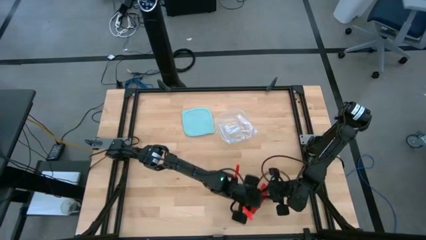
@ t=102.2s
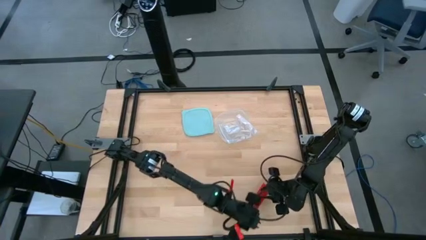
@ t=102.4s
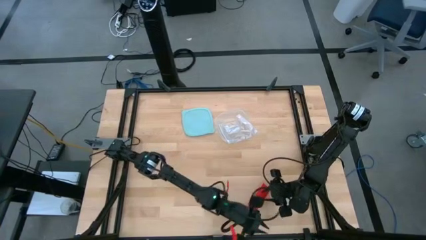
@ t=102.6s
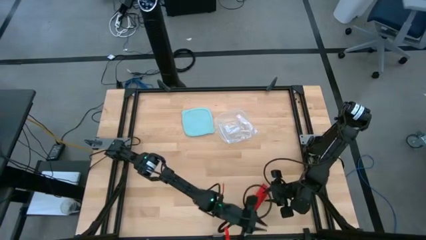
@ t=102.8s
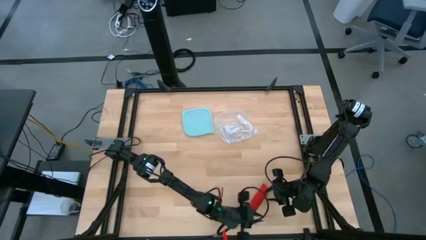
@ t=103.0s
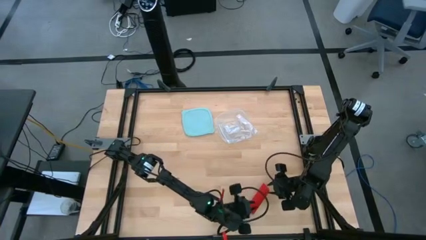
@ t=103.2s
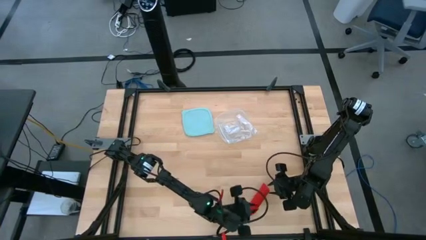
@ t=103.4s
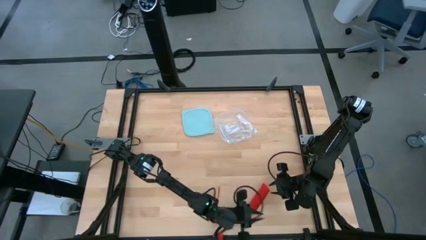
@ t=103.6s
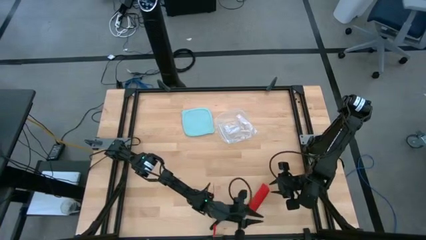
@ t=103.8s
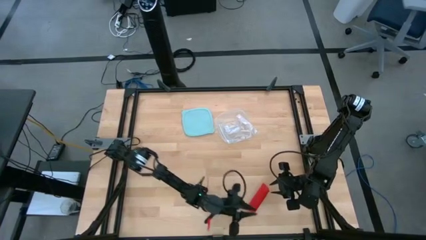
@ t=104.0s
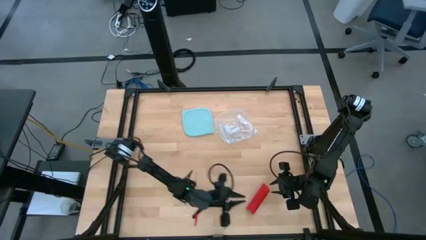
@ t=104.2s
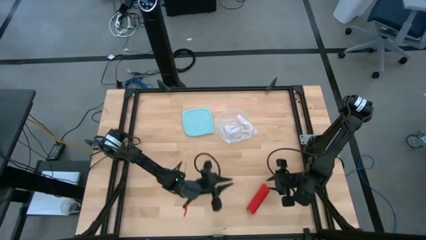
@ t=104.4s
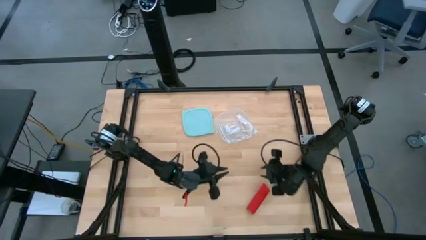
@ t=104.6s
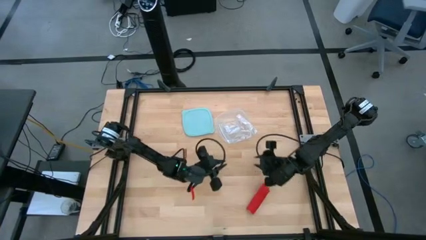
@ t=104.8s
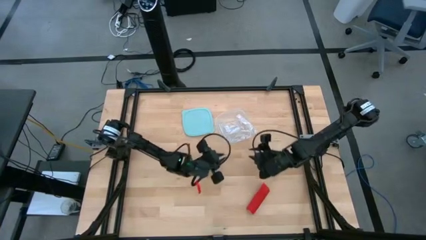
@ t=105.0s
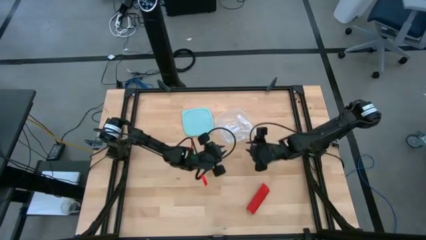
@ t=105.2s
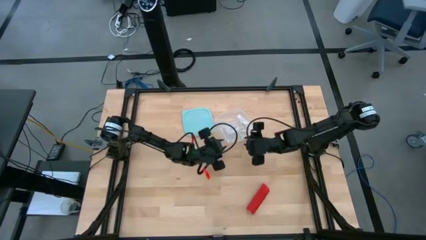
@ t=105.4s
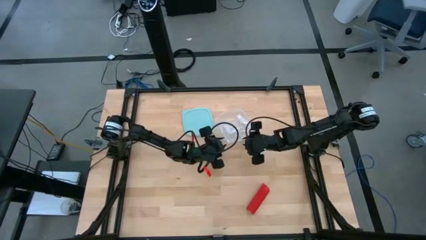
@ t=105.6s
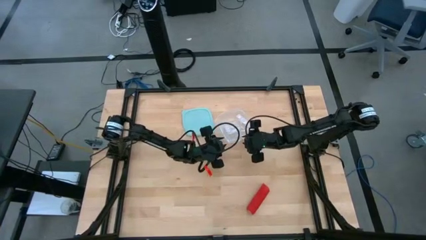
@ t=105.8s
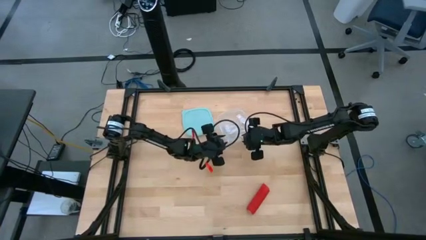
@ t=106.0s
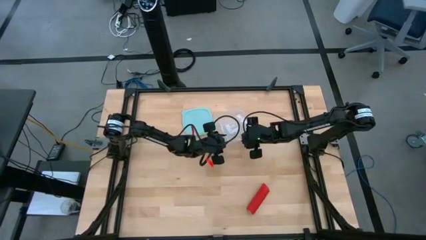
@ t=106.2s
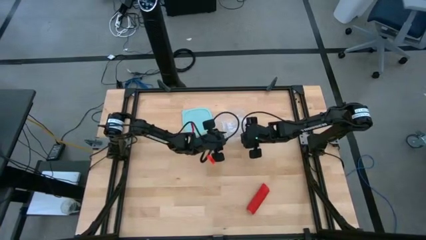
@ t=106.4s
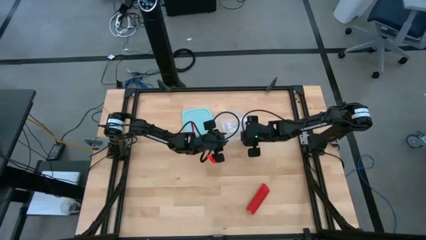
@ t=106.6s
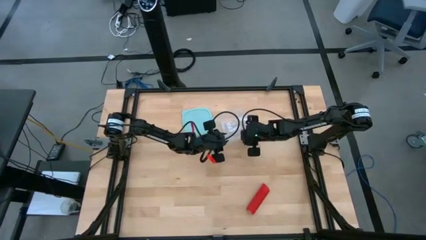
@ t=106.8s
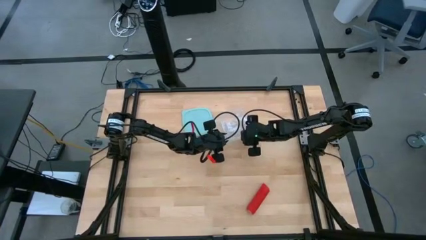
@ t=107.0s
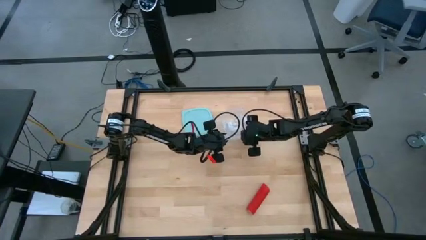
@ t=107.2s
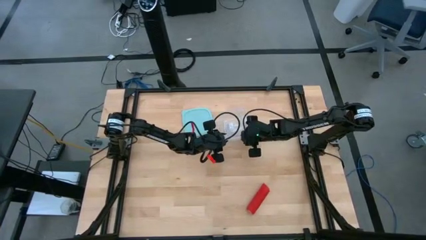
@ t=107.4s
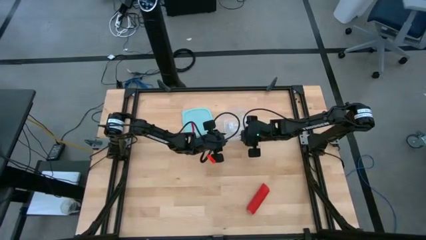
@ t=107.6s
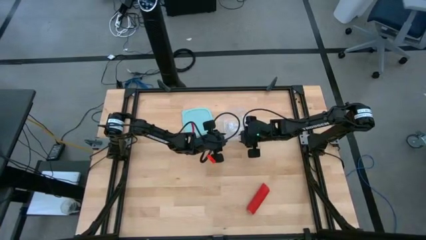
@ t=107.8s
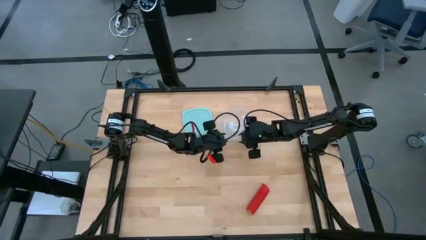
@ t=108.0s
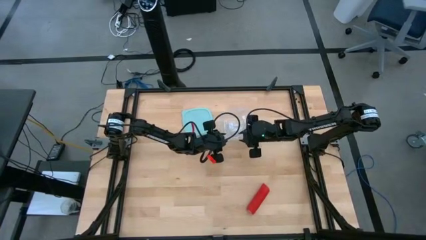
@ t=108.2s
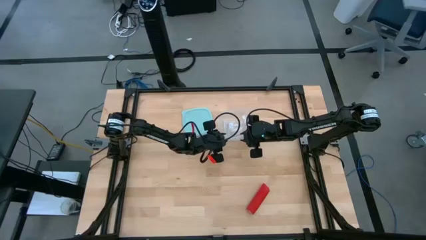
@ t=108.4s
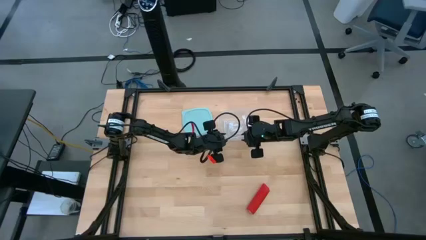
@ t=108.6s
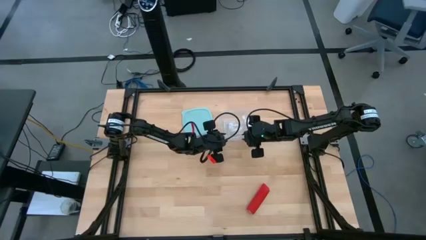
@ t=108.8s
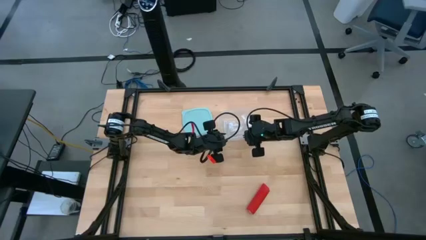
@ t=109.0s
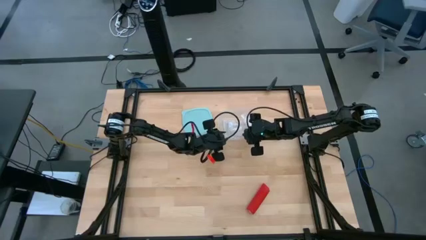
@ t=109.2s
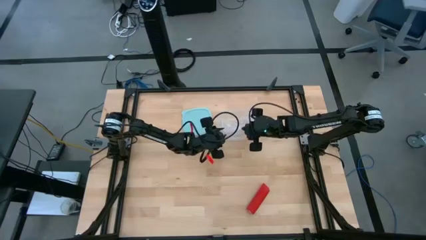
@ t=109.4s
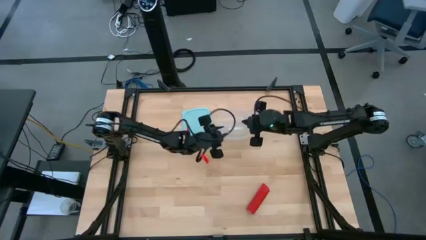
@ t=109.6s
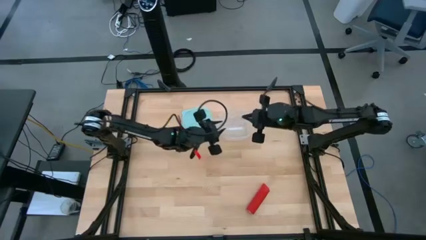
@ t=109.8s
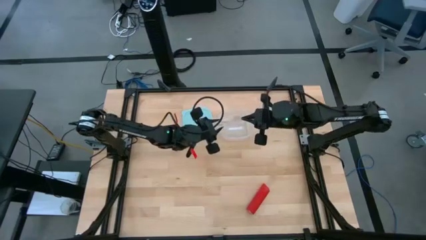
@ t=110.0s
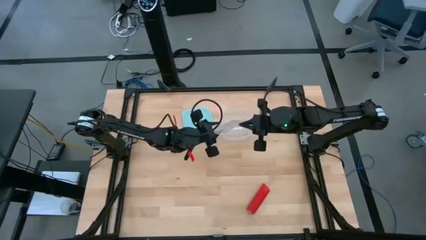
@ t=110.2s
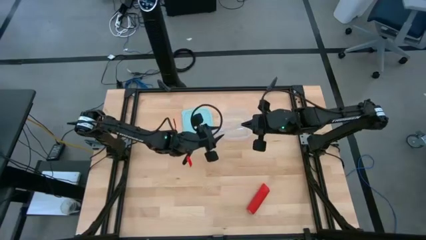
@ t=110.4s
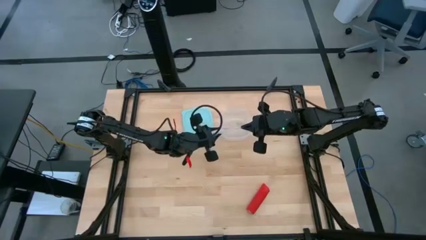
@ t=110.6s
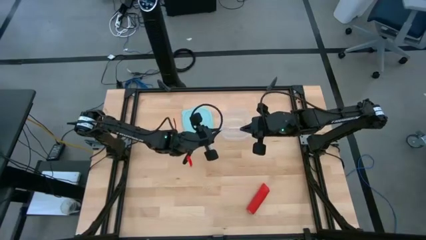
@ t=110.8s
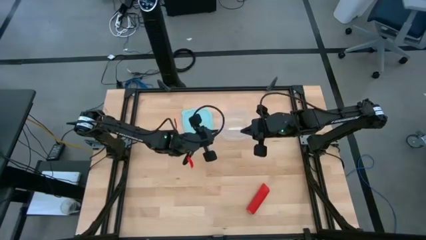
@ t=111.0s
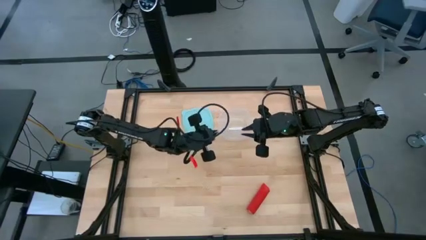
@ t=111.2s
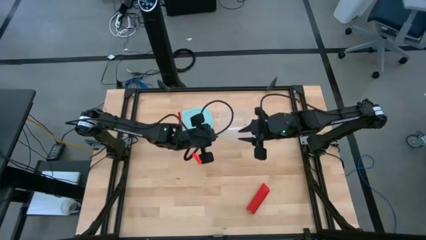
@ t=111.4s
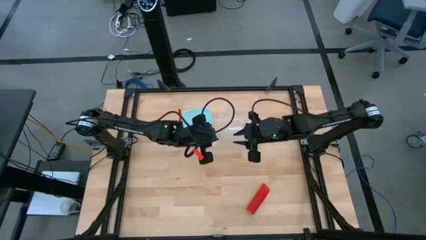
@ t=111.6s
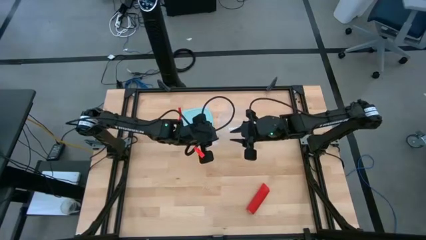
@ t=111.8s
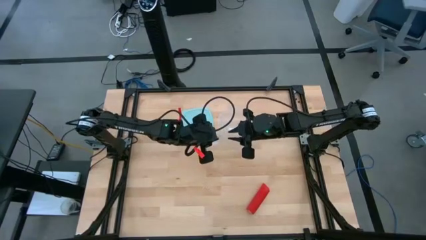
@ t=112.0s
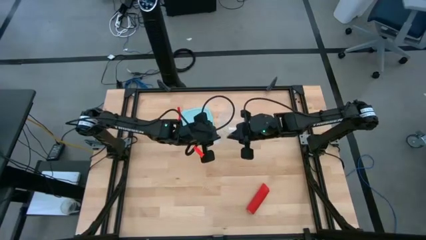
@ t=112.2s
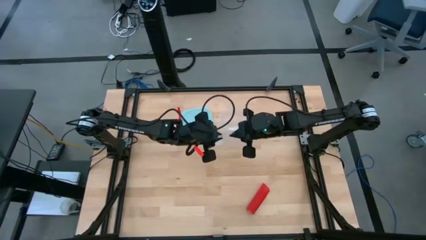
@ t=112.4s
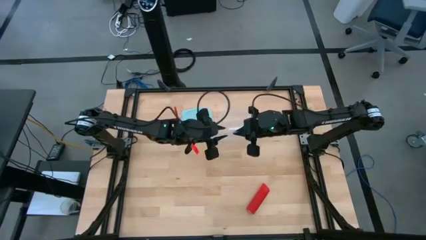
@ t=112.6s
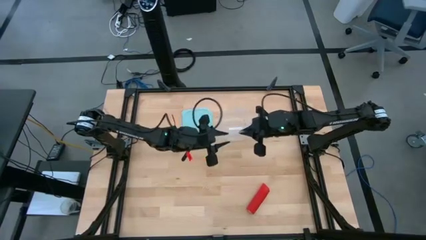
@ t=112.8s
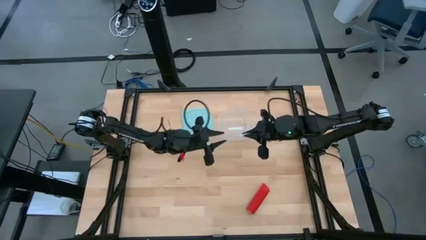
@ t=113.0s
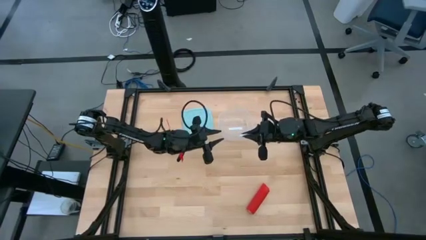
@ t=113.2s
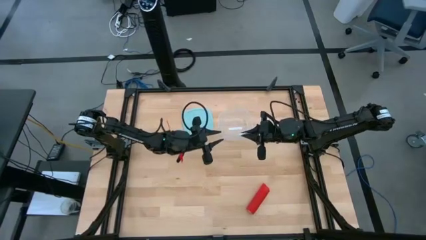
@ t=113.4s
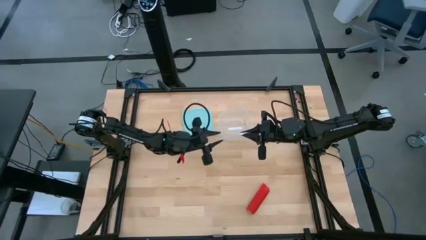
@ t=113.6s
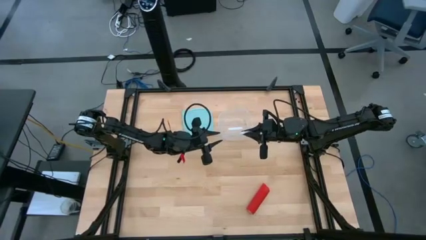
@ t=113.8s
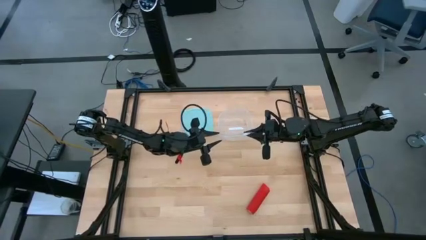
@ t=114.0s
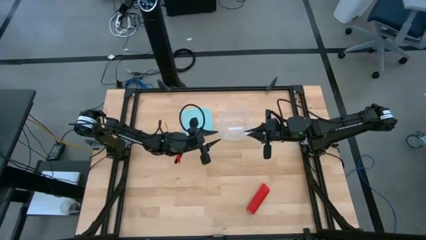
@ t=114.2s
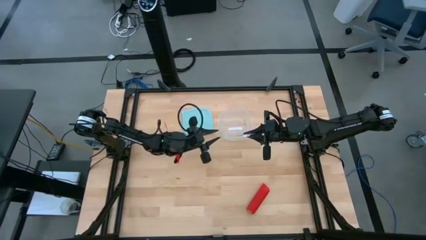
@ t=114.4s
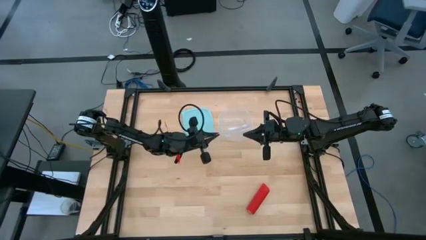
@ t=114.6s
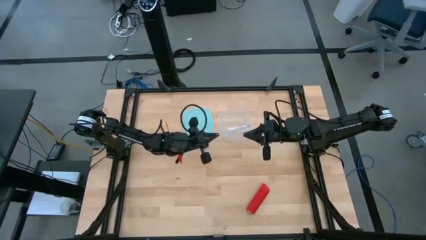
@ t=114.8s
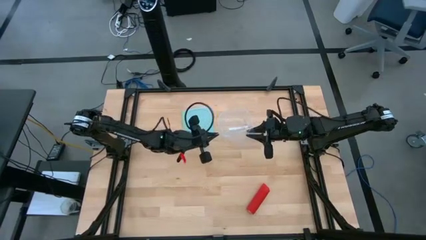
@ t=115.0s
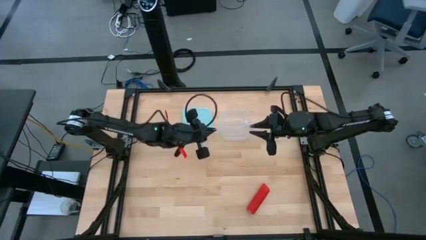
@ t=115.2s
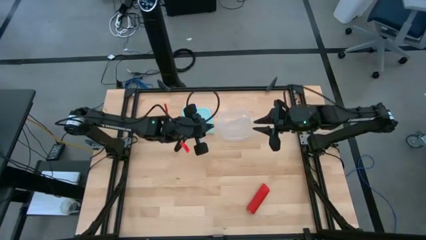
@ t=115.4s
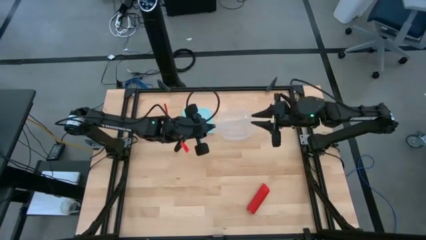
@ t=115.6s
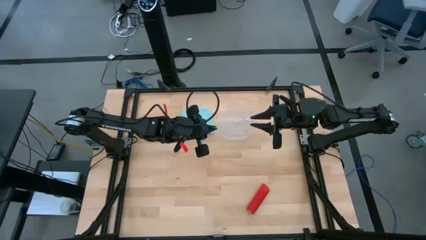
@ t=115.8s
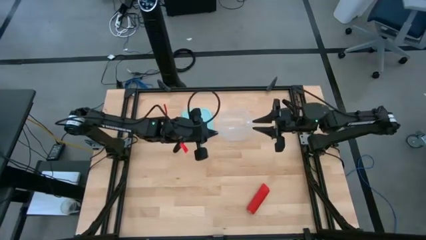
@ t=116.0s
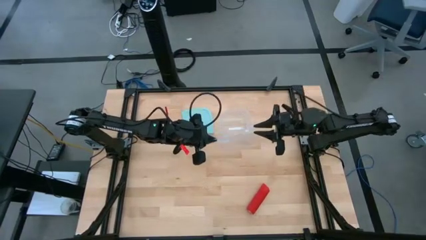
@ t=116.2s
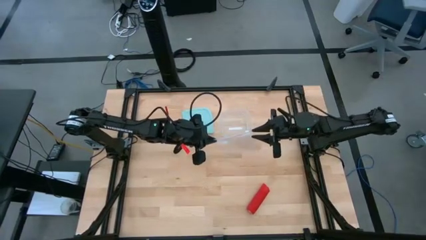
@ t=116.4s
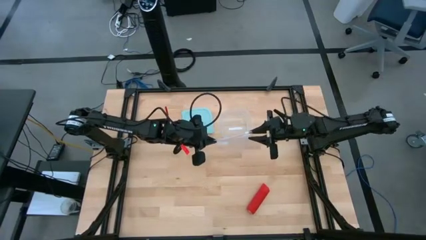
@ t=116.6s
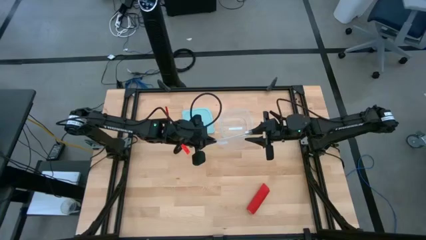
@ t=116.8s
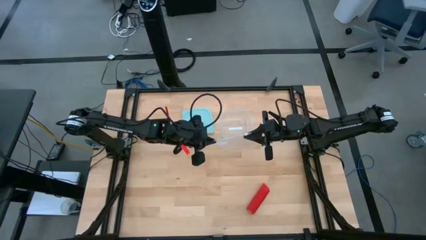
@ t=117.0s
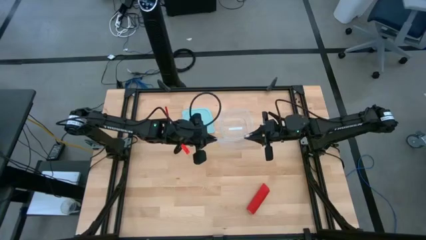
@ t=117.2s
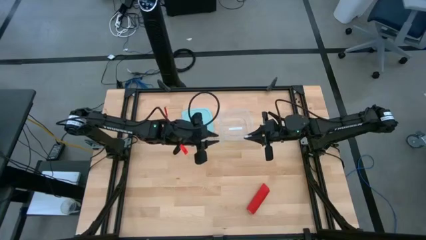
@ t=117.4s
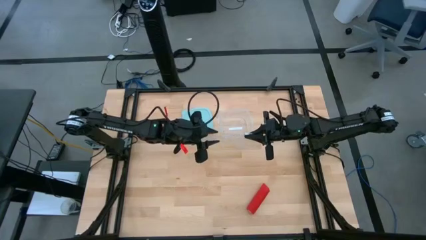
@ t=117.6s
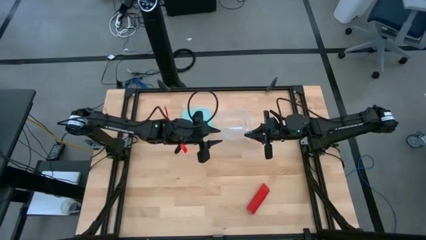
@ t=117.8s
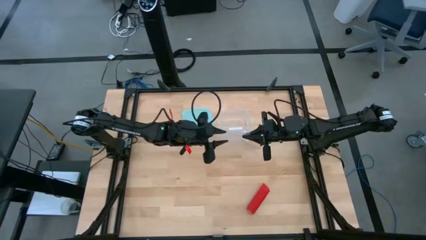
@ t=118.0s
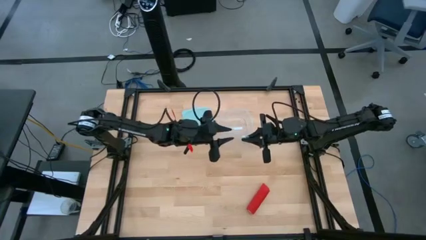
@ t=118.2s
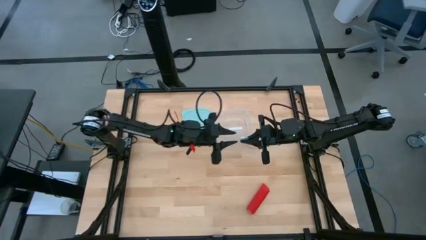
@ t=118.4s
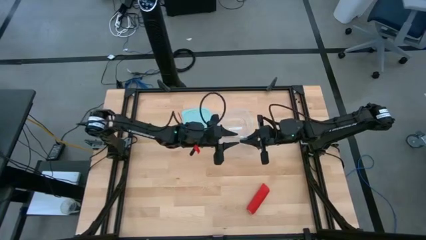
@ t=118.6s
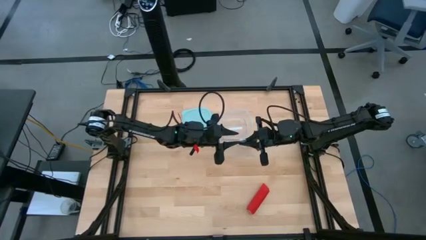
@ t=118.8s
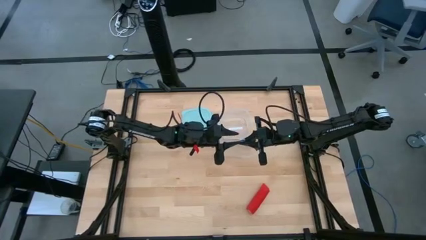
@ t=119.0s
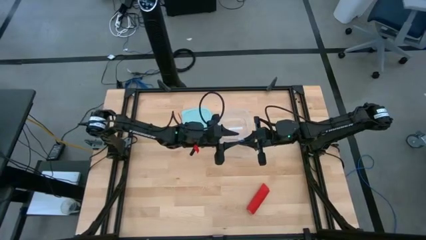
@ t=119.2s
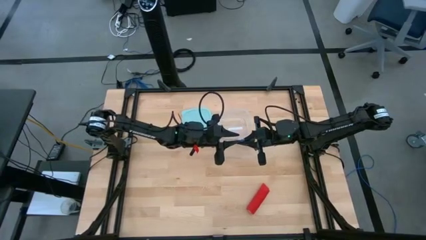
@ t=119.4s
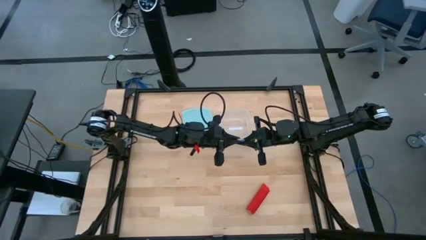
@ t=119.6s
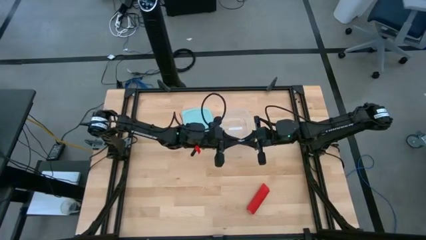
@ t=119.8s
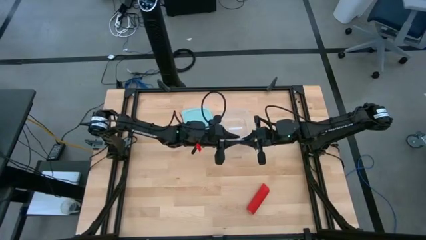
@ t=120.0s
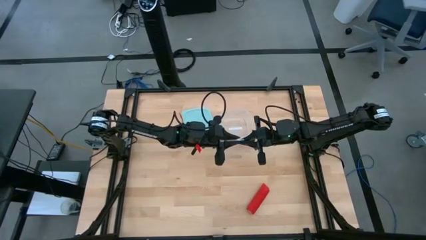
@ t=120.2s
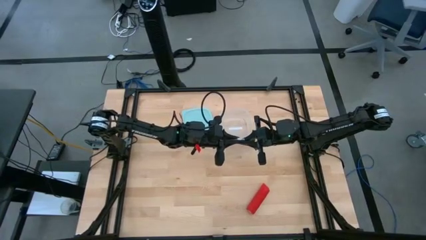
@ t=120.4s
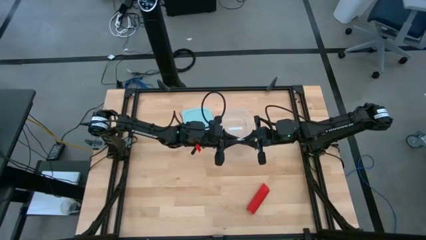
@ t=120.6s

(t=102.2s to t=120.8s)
Task: Roll bandage
Open the transparent zip lock bag
